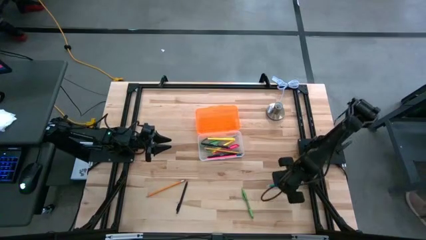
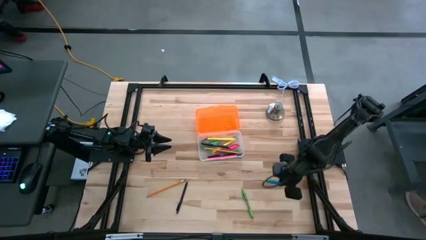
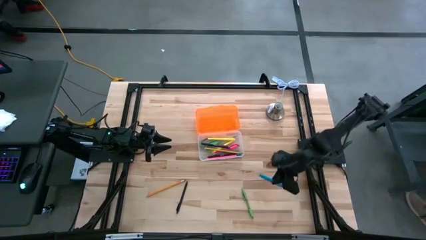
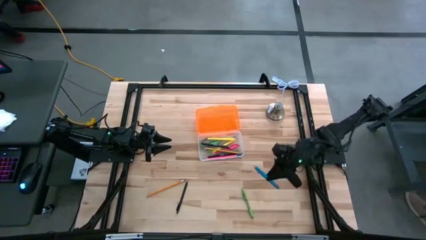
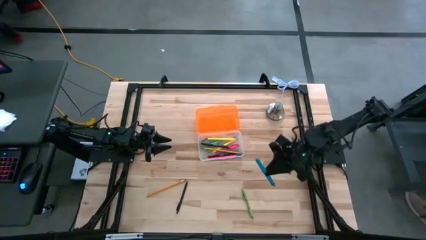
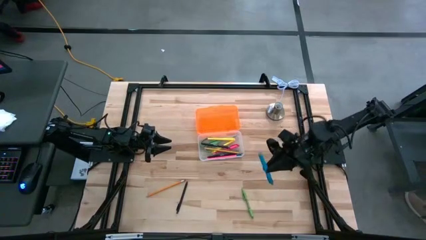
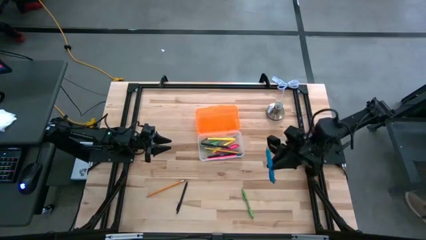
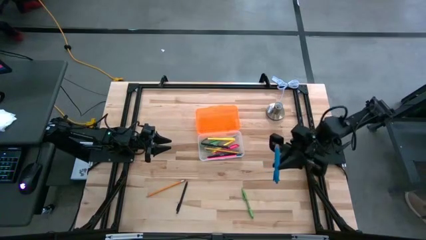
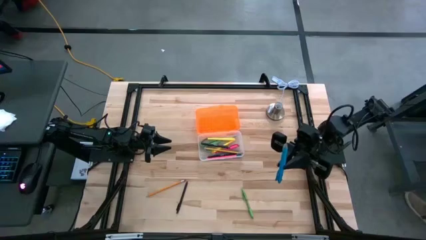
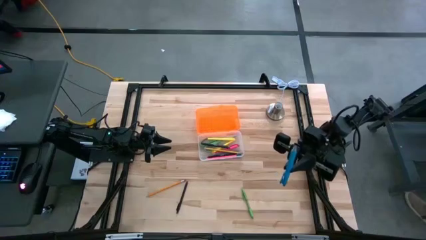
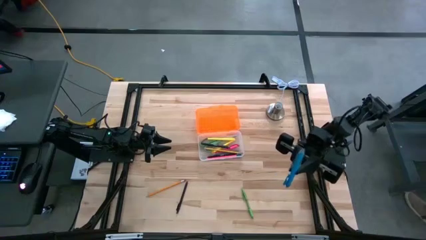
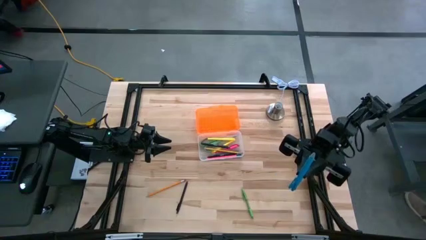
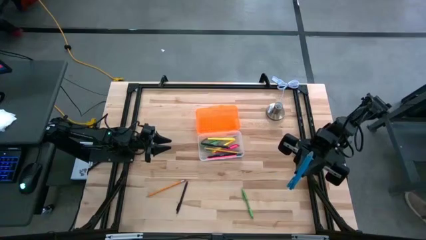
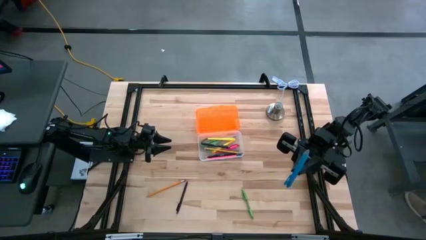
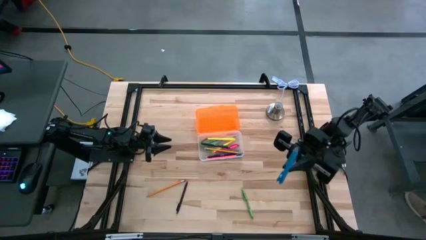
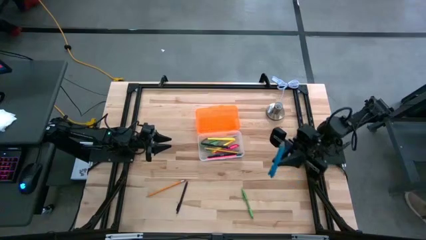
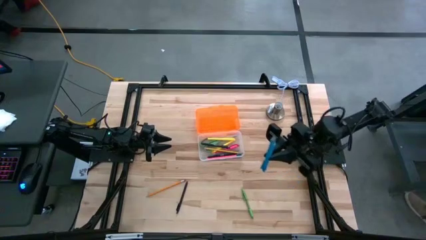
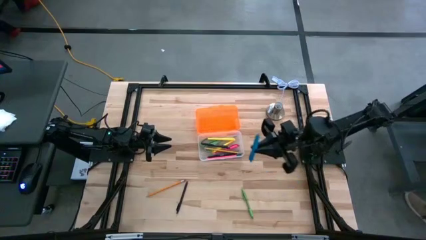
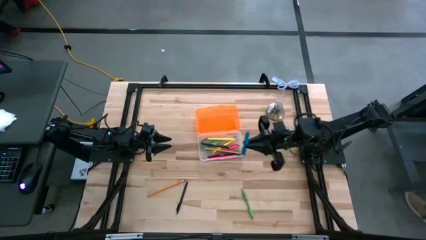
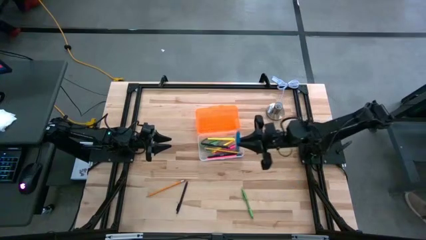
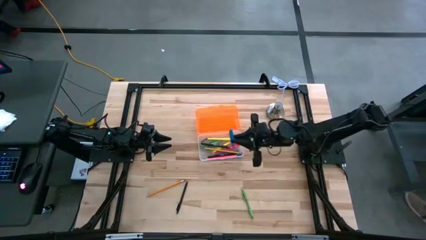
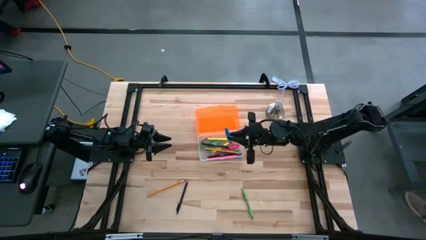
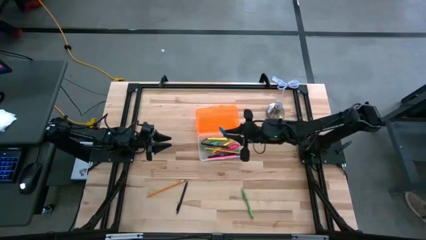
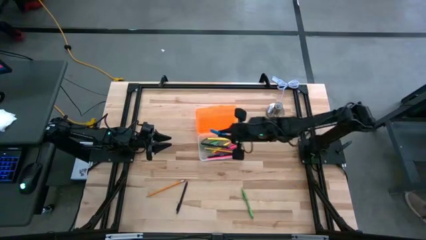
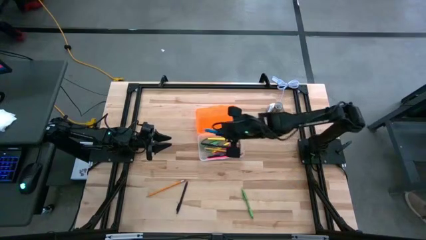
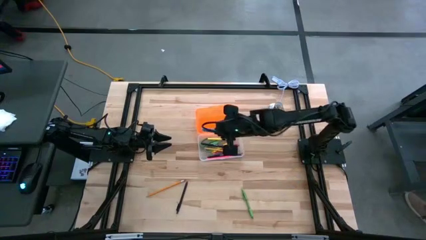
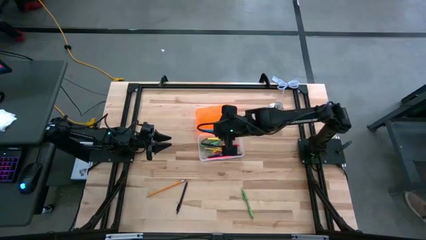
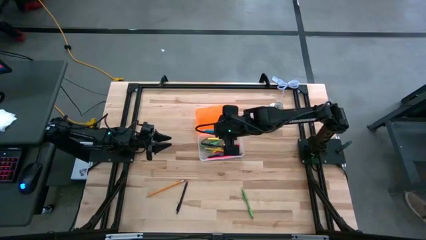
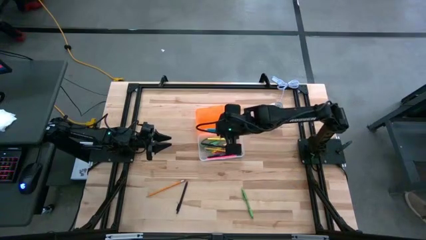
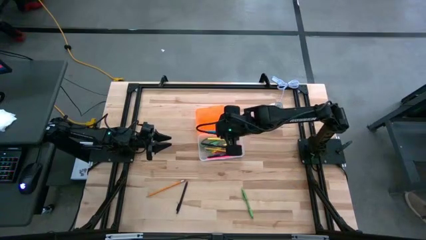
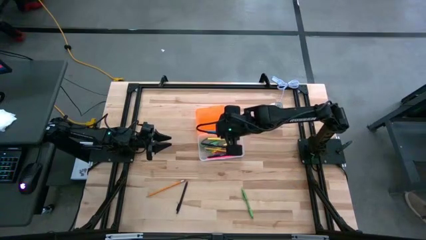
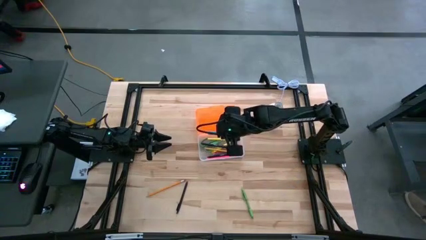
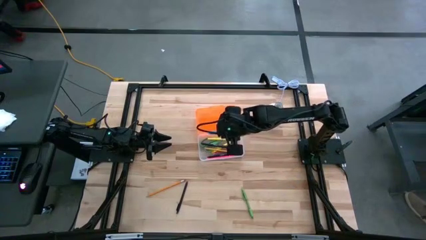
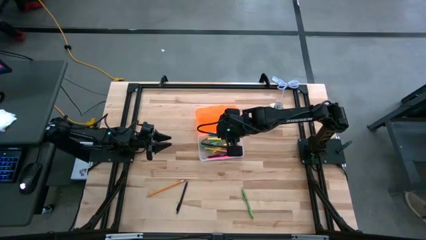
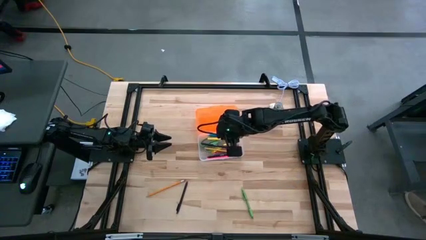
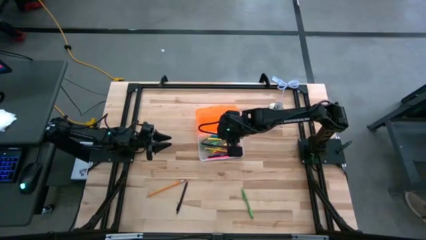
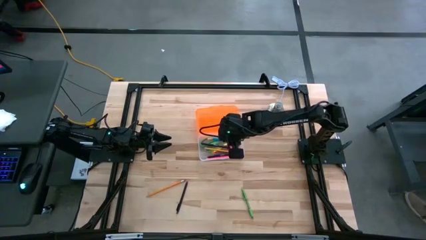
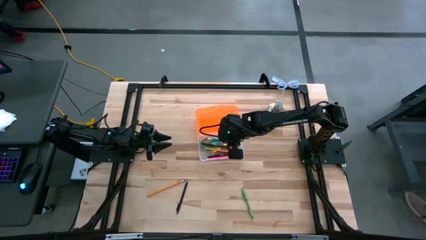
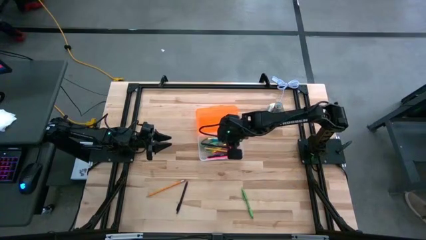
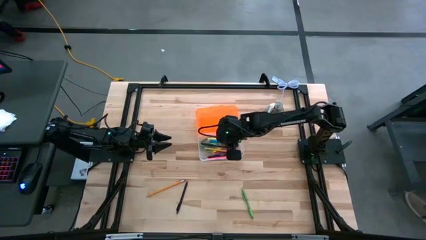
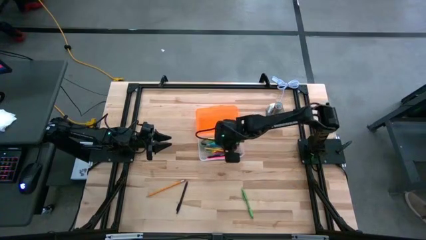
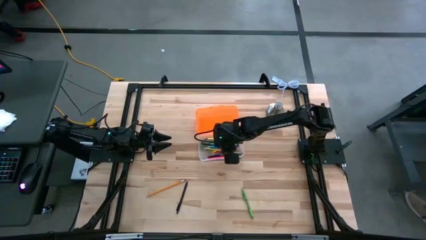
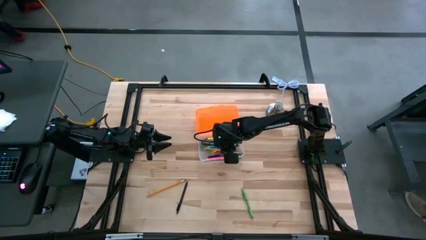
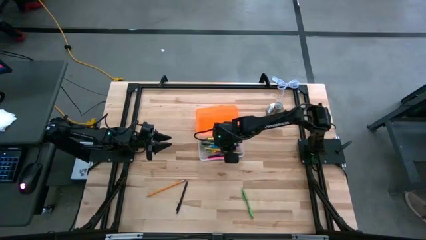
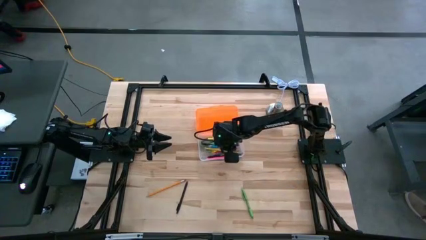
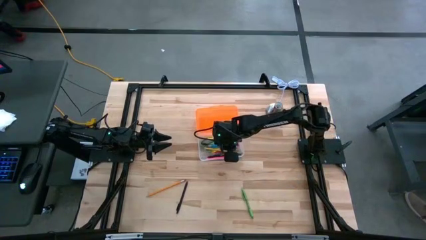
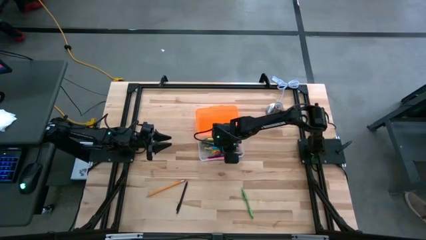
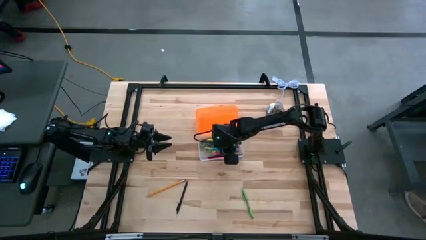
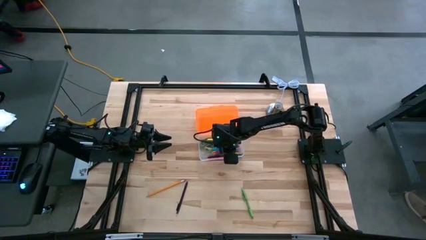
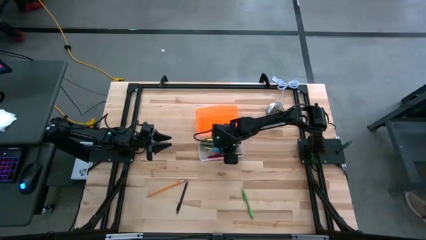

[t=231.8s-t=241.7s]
Task: Pick & place school supplies into a supply box
Put the blue pen into the container

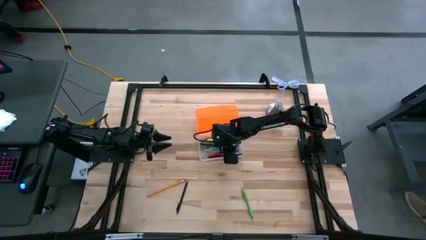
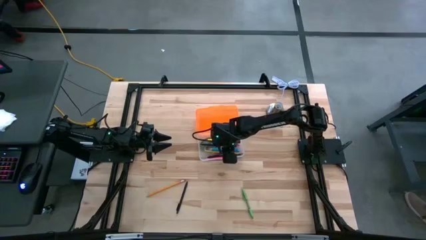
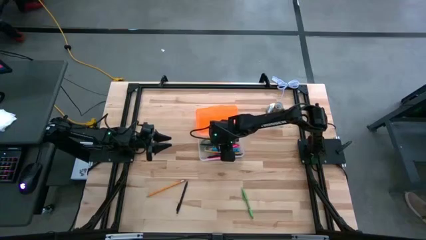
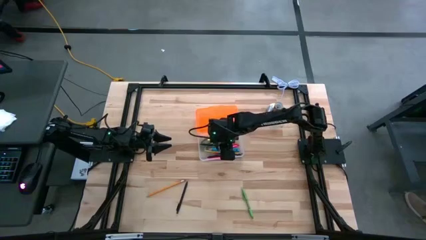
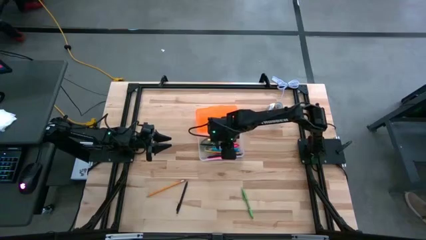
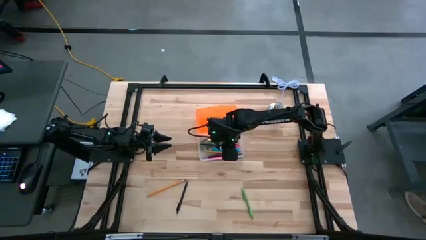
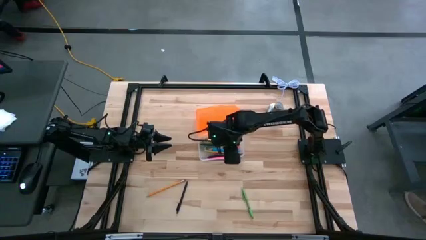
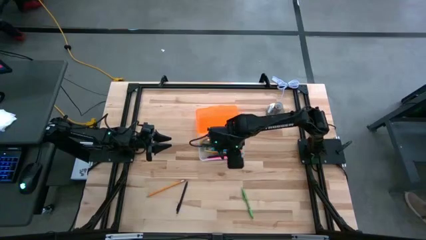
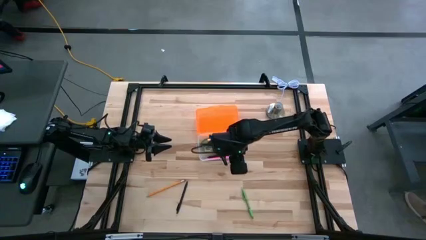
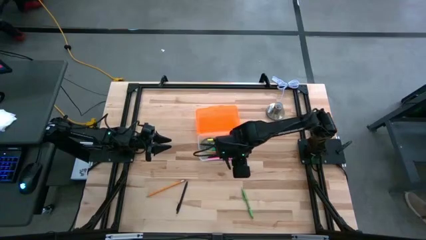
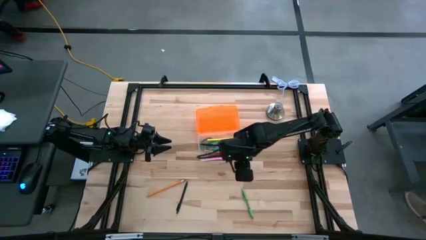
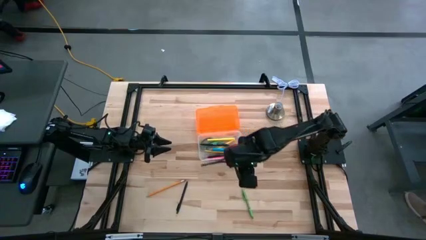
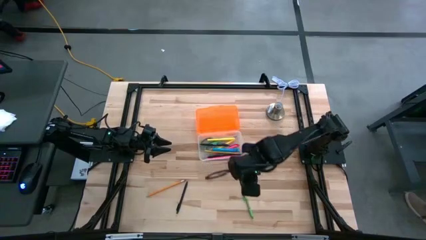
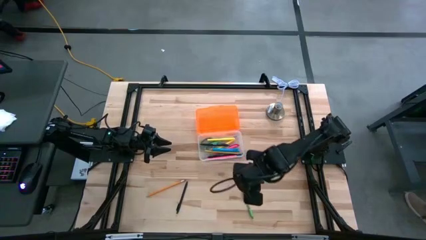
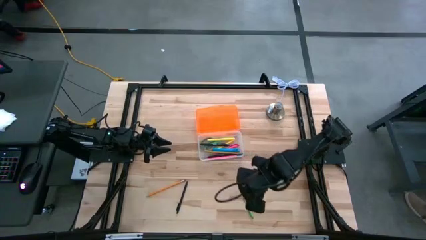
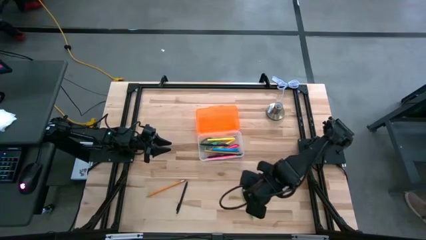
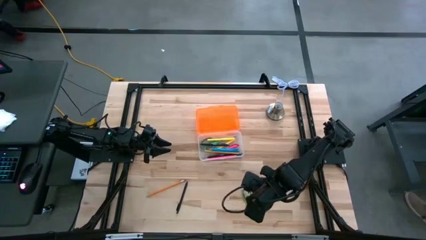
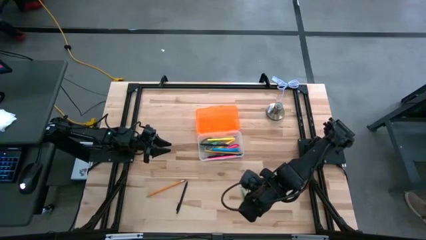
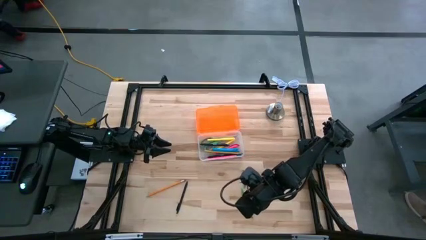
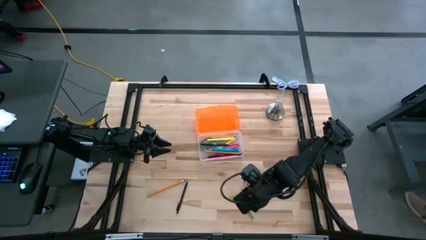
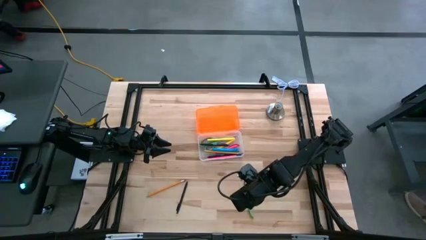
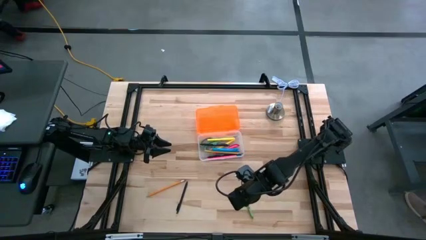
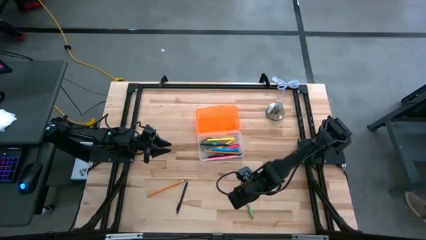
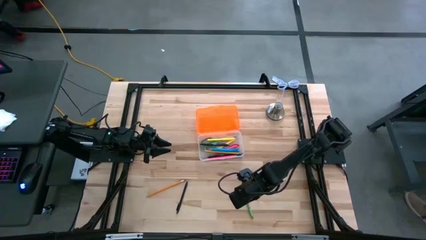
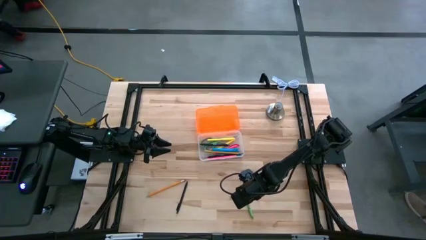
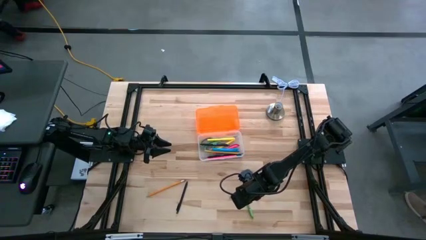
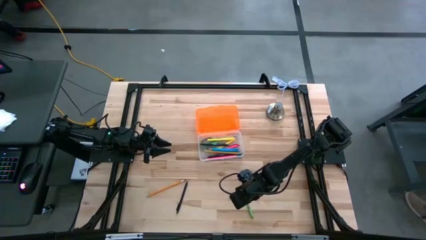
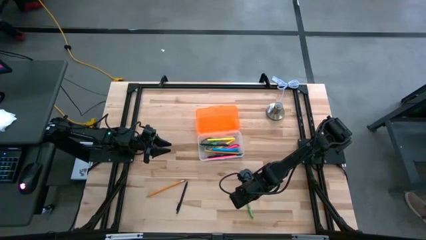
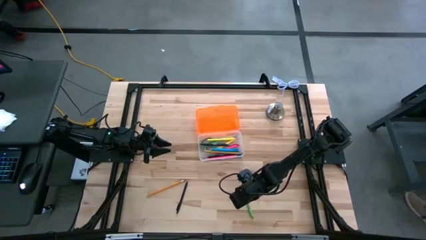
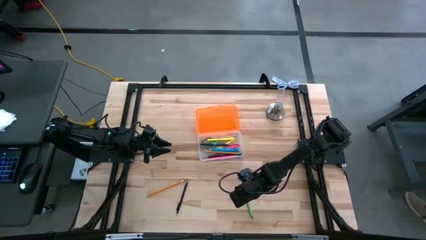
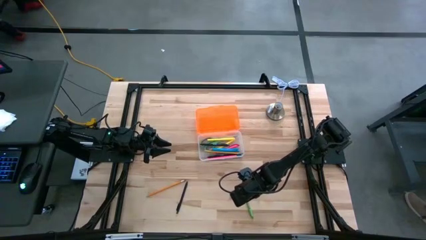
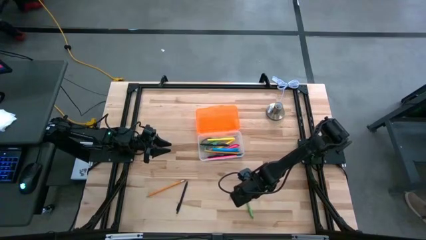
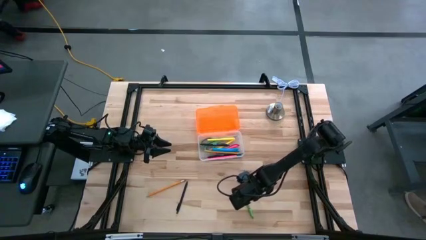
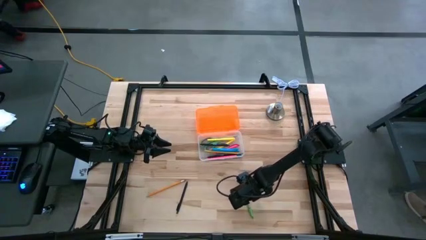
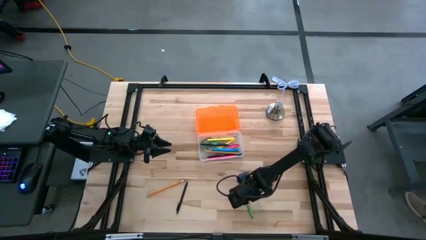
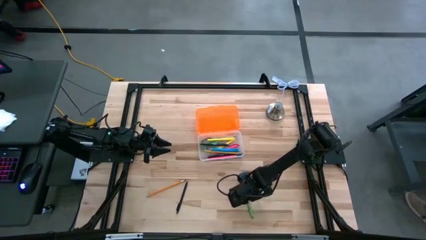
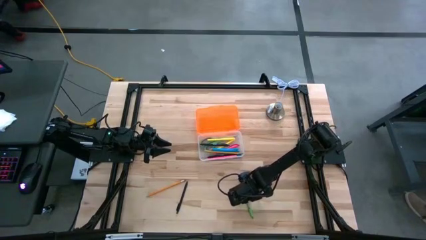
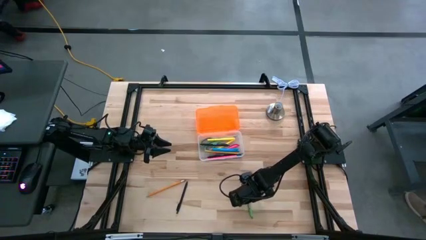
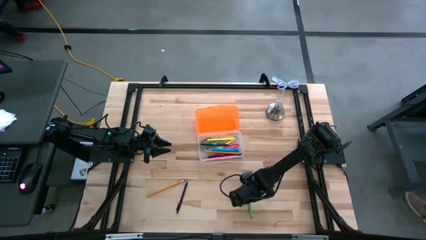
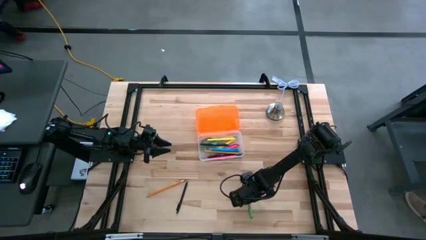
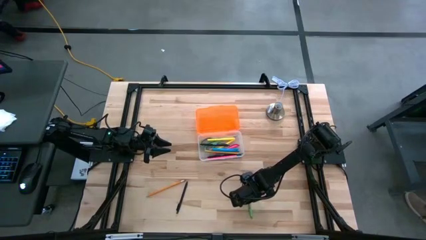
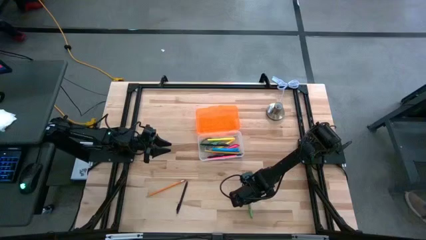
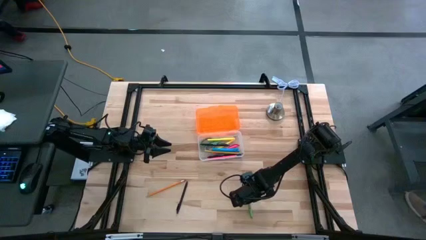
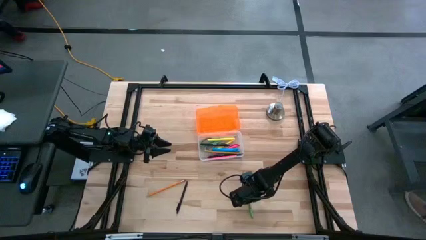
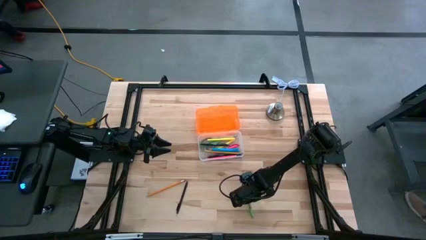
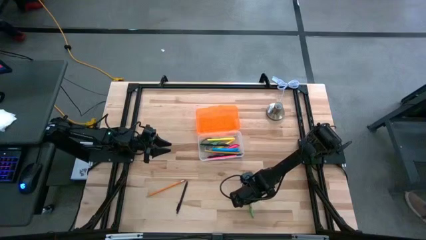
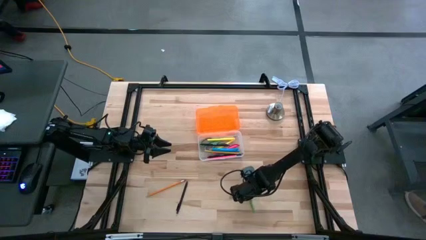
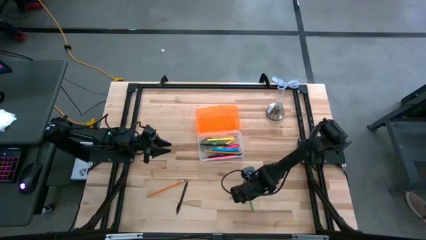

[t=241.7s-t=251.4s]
Put the green pen into the container
